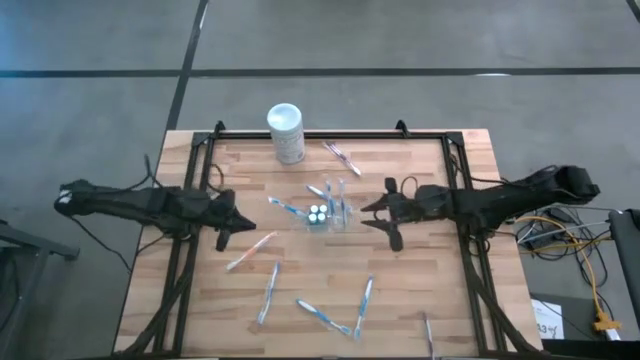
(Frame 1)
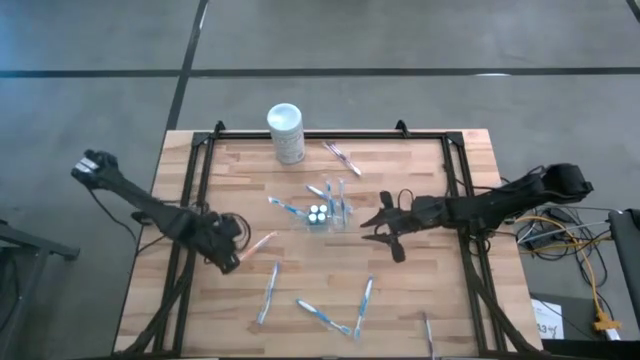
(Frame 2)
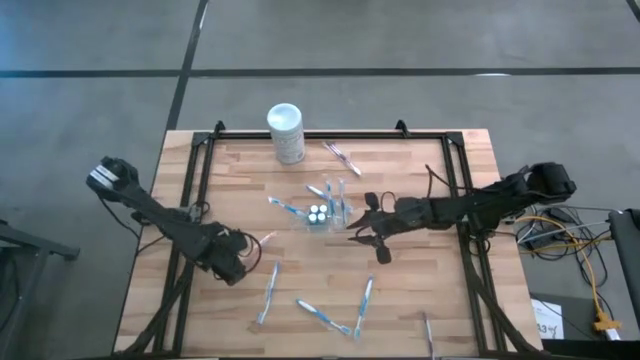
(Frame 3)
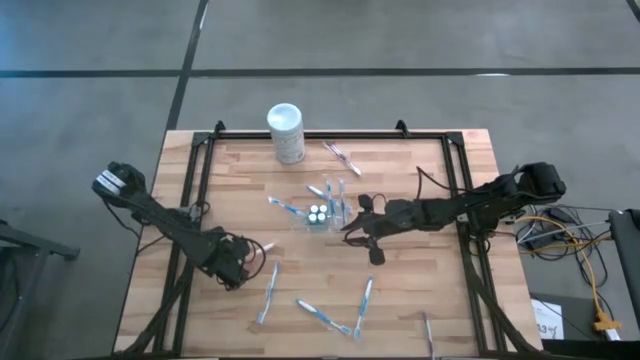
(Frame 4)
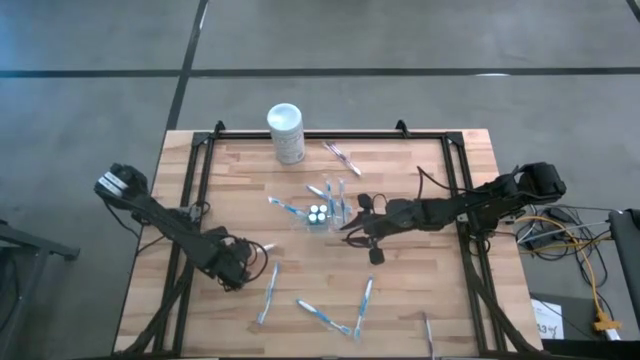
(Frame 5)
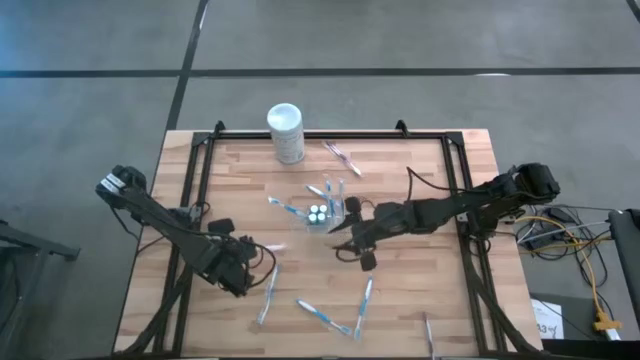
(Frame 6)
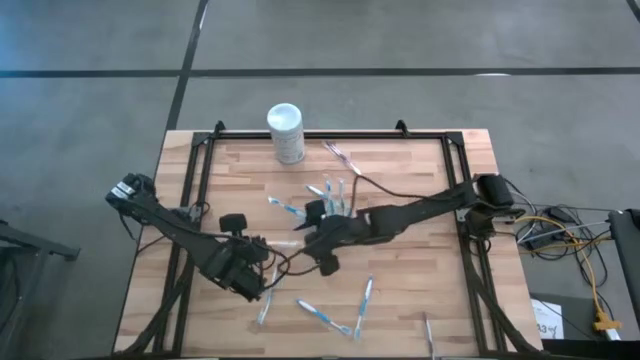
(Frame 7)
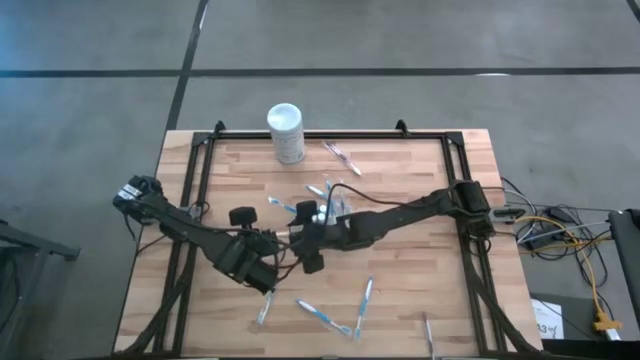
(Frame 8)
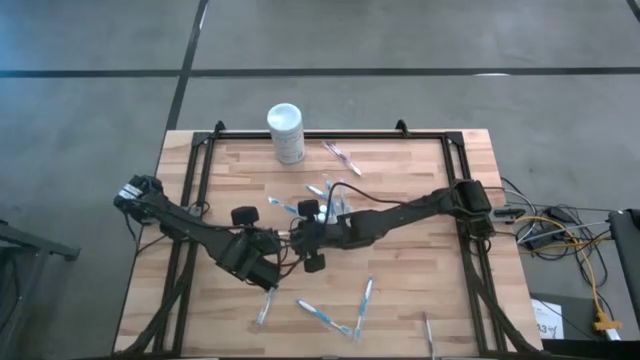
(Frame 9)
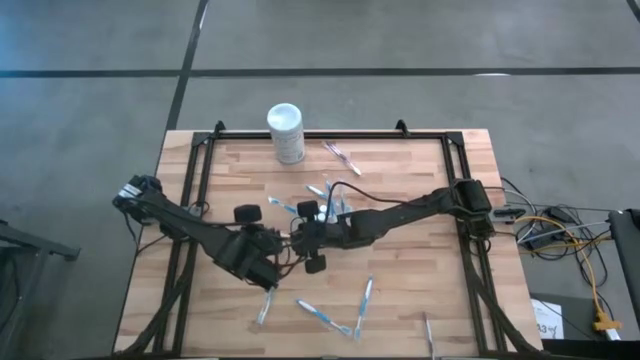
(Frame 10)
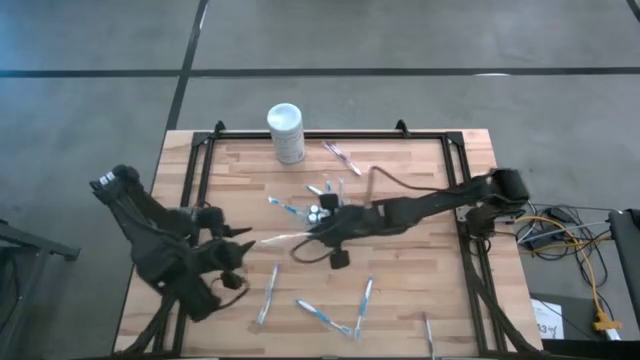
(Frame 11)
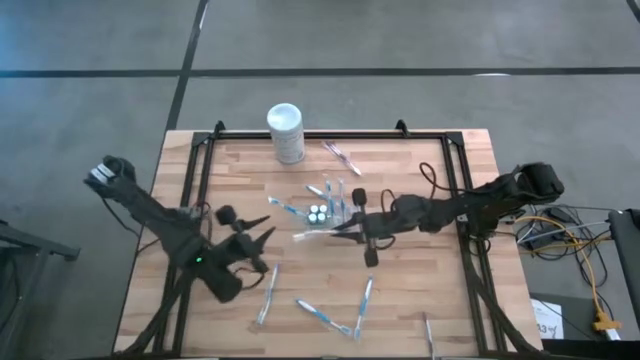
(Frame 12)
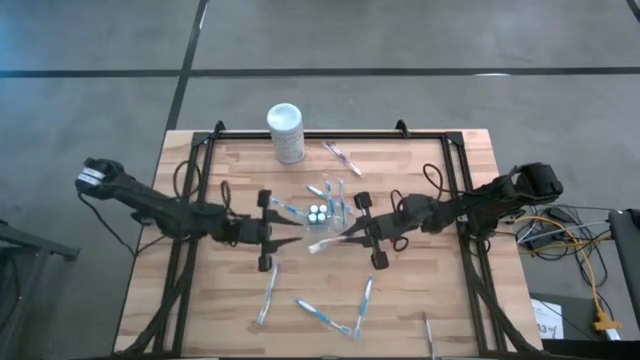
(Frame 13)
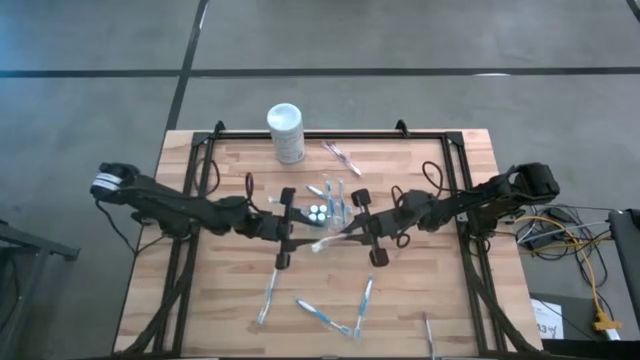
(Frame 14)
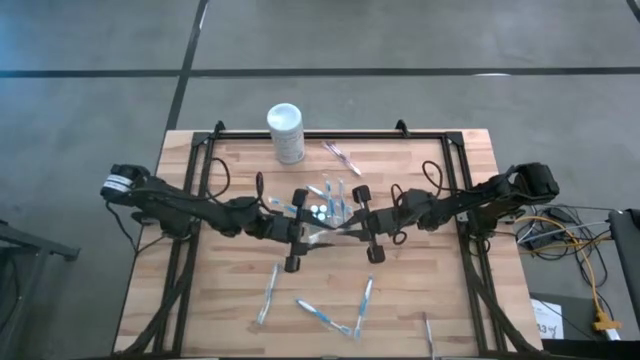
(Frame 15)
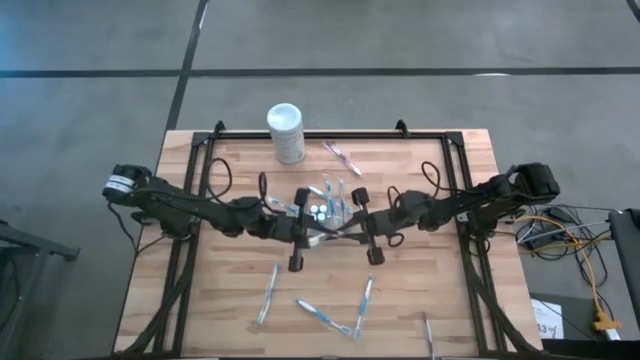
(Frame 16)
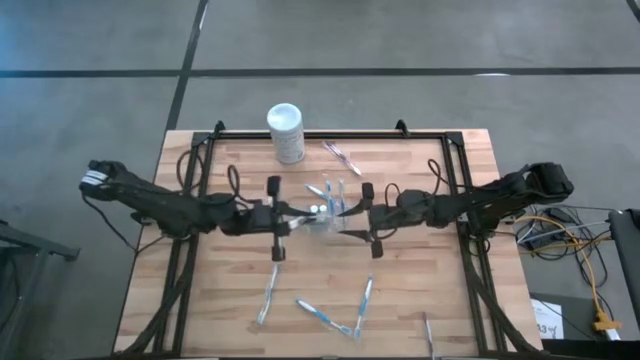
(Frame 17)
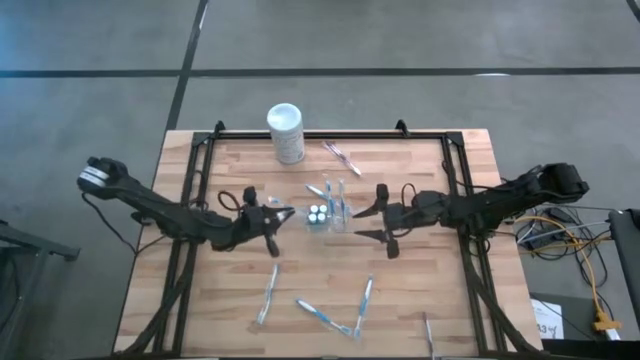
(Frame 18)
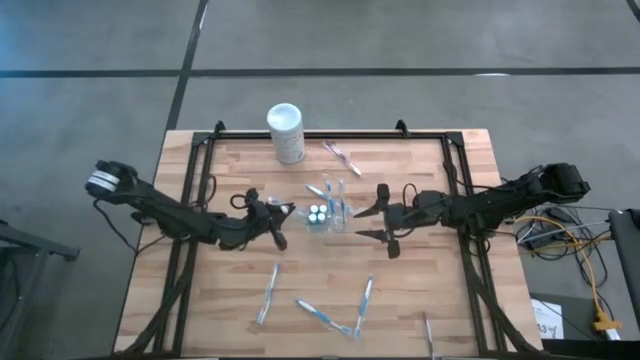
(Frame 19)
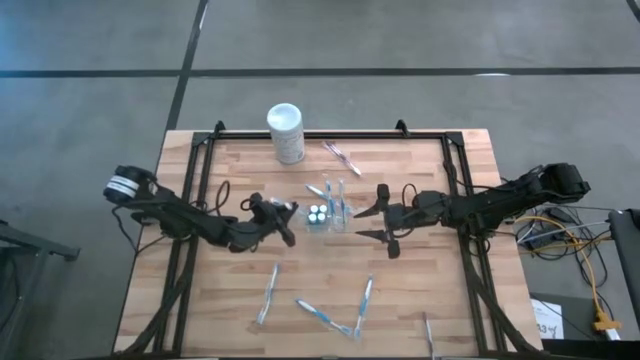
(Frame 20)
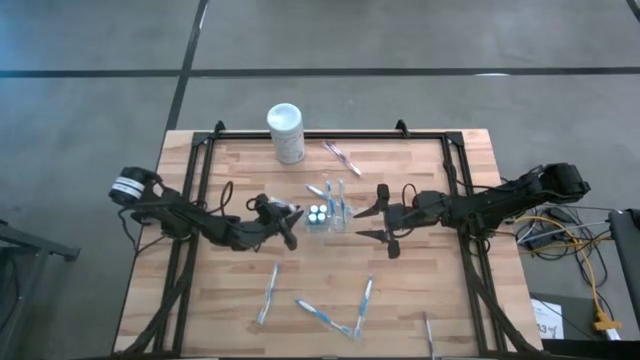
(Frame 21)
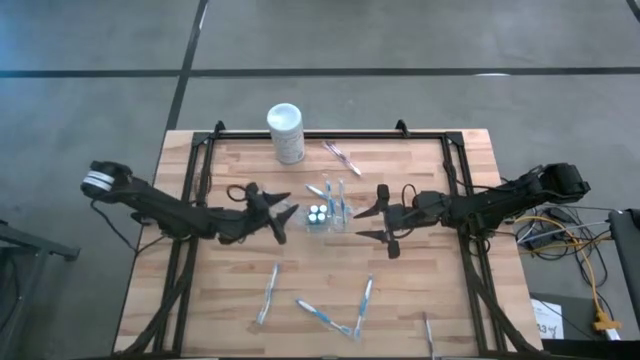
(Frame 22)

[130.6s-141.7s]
Task: Pick & Place toothbrushing station
Put the orange toothbrush into the transparent organizer

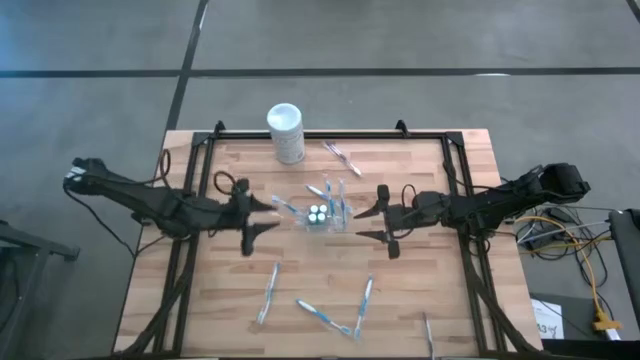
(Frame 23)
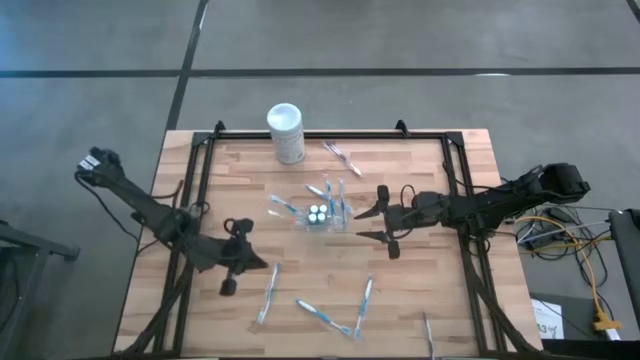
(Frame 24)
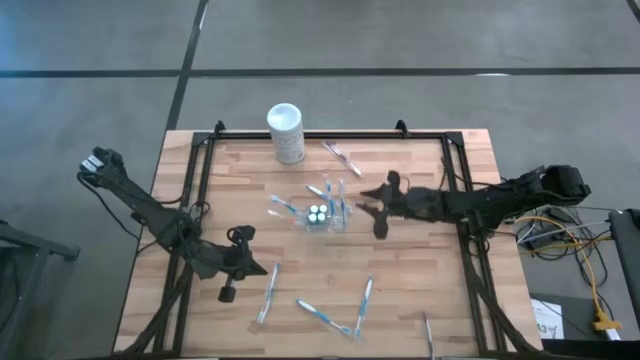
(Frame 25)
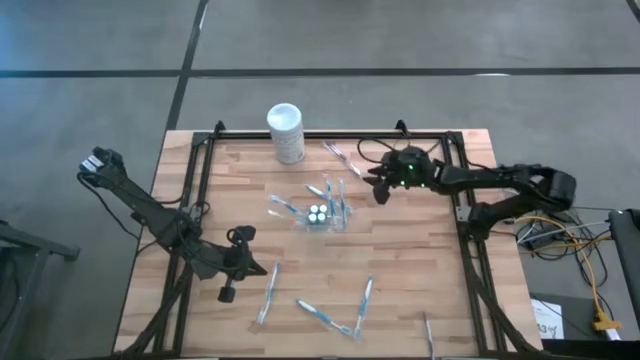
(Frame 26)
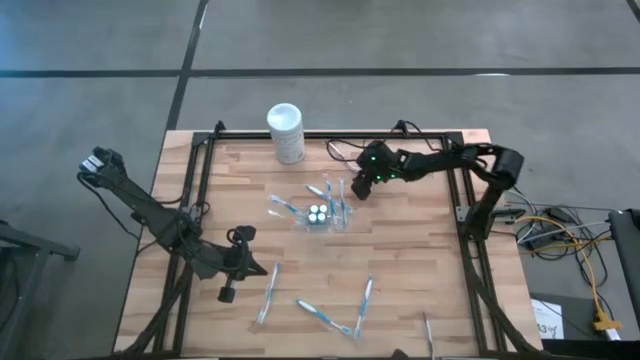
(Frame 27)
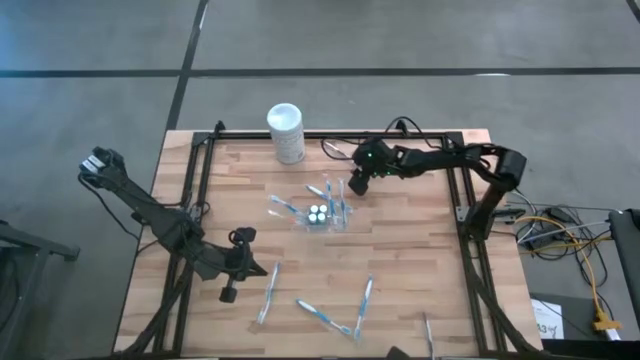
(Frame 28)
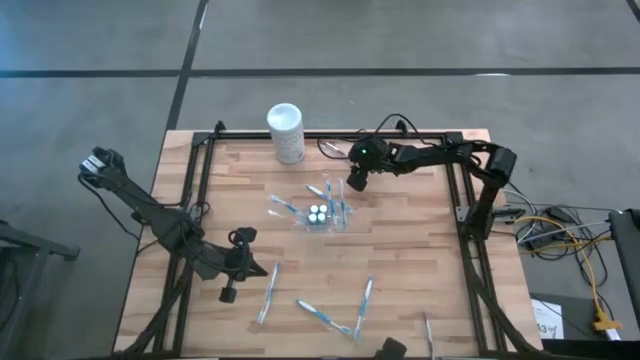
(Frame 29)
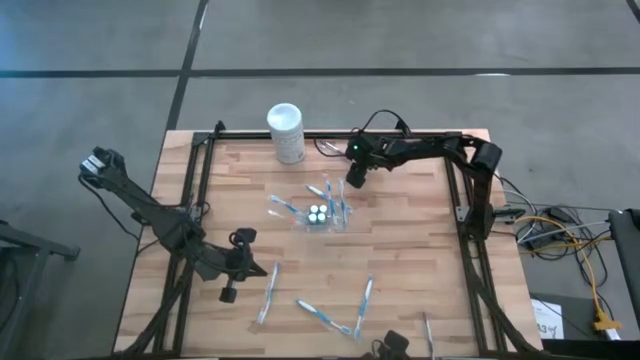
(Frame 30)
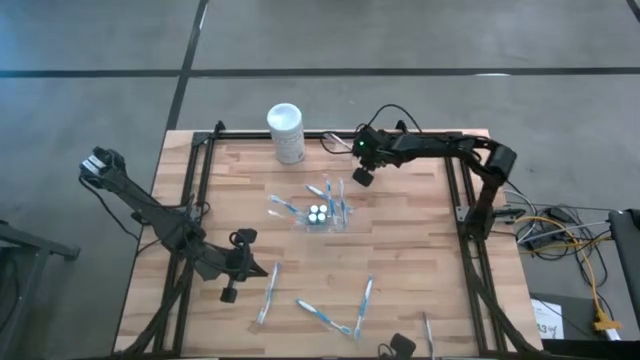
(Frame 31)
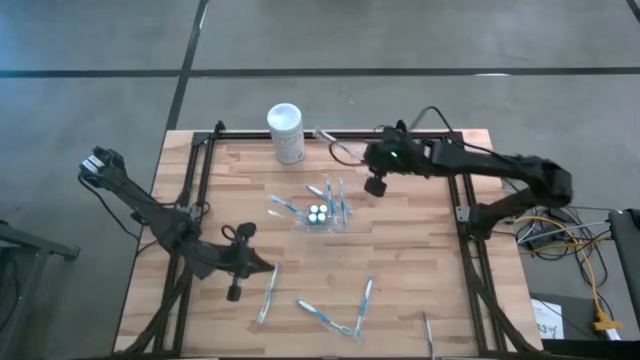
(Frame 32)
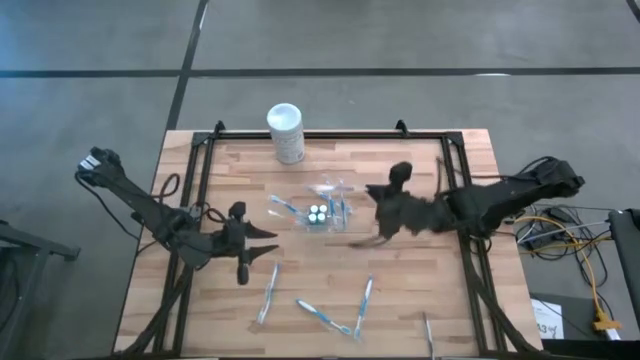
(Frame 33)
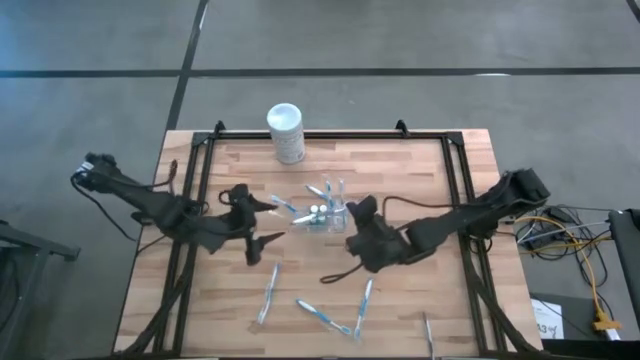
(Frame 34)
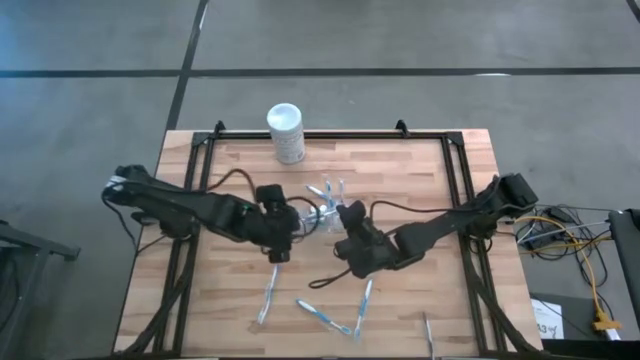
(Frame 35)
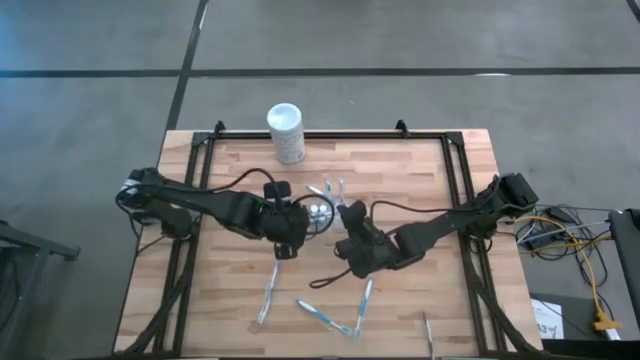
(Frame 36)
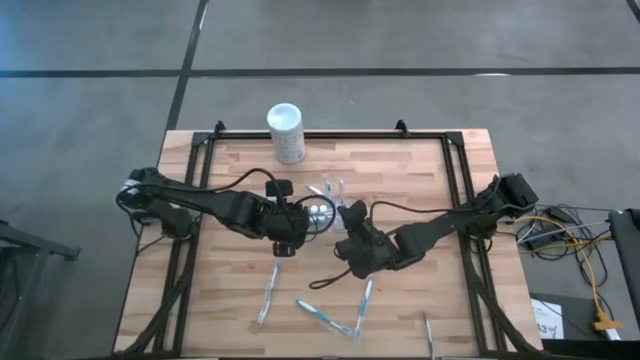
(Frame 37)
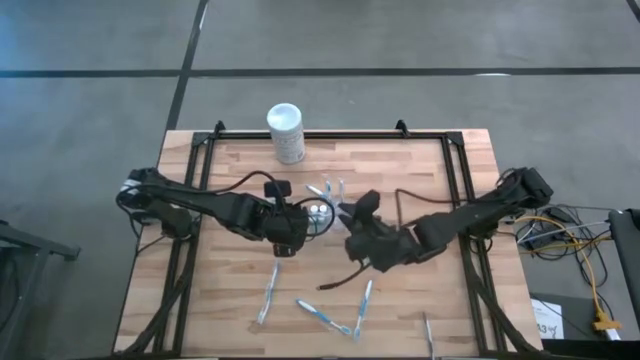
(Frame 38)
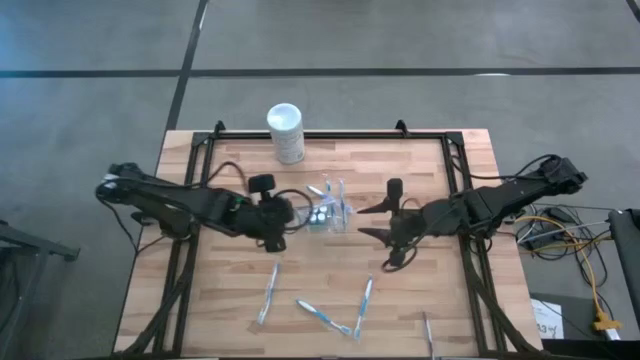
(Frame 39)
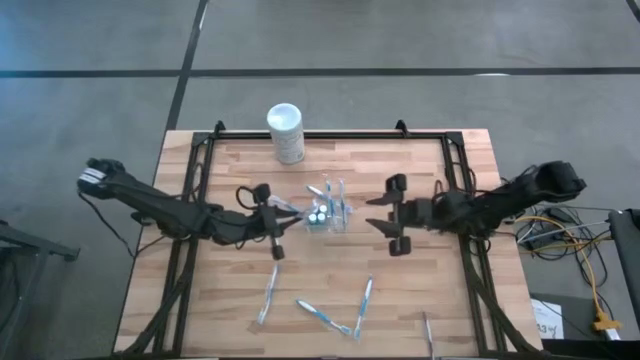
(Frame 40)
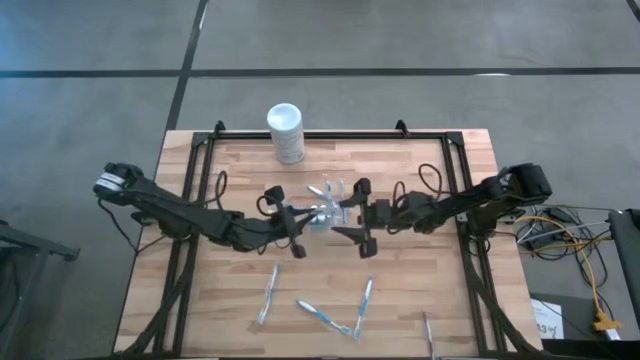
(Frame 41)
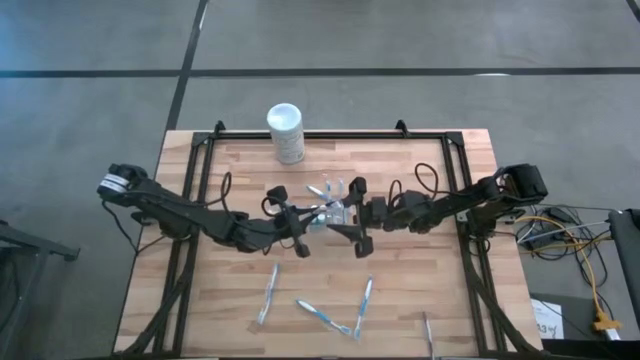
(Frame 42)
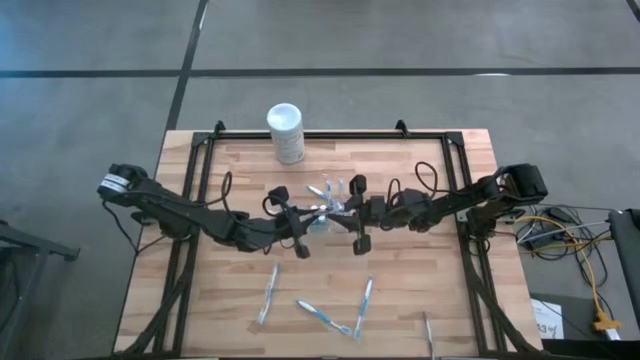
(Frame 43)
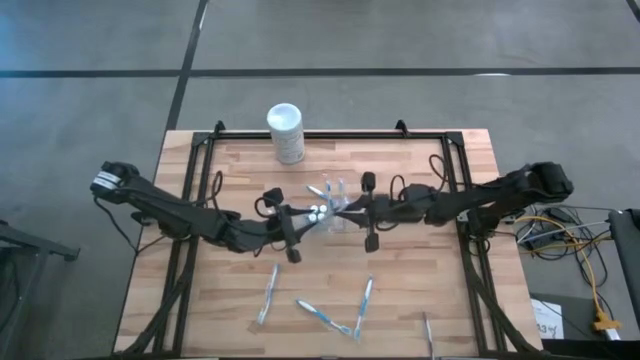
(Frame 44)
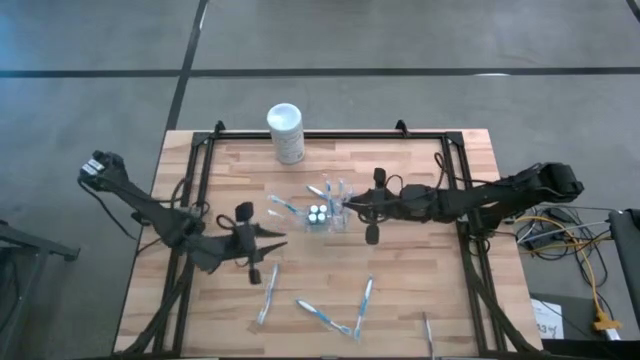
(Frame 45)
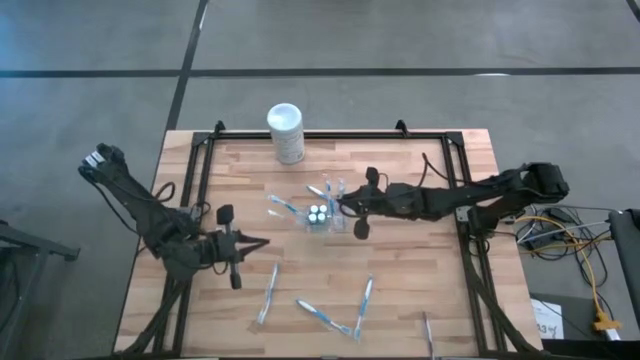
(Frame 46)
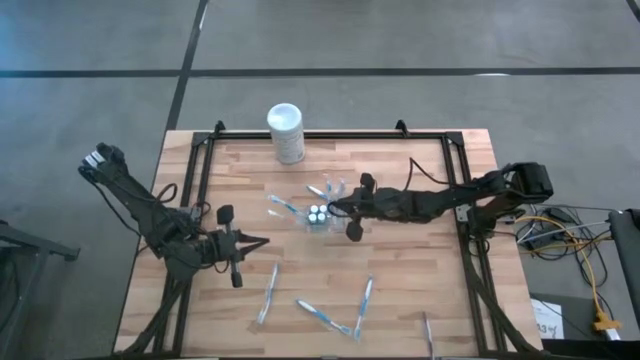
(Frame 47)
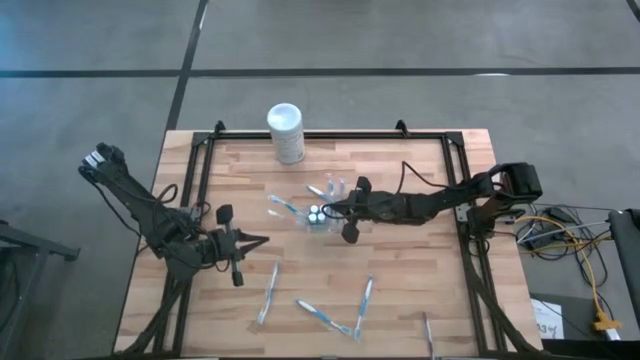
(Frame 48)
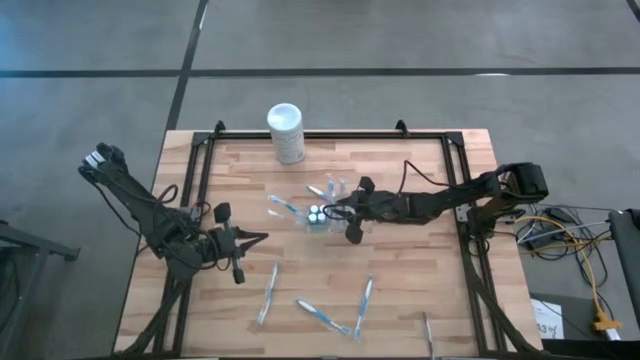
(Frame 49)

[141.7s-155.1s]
Put the purple toothbrush into the transparent organizer
